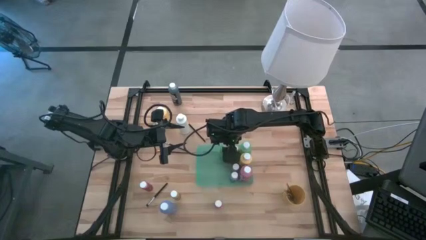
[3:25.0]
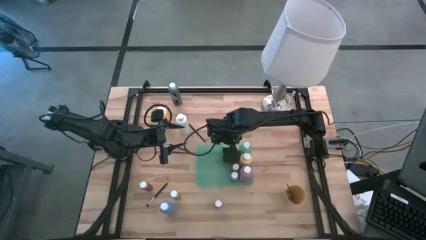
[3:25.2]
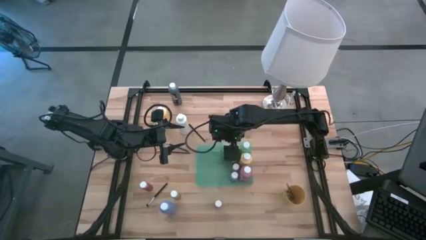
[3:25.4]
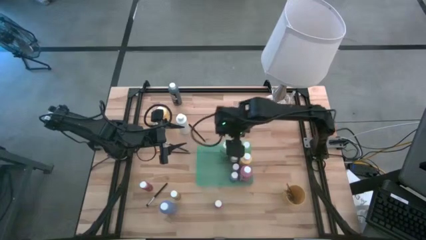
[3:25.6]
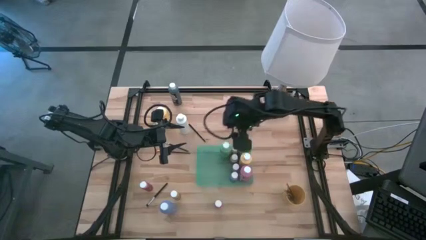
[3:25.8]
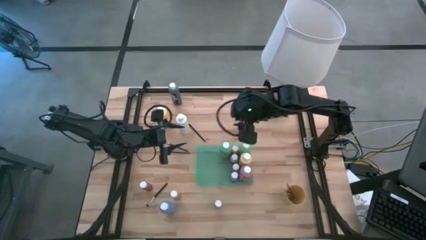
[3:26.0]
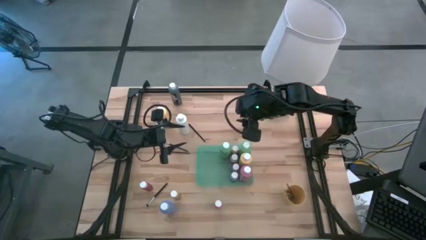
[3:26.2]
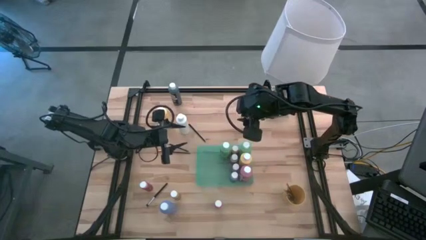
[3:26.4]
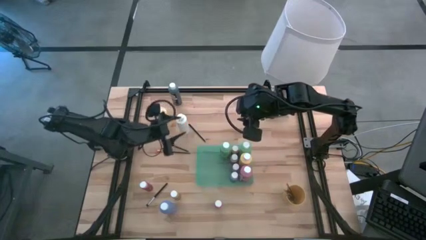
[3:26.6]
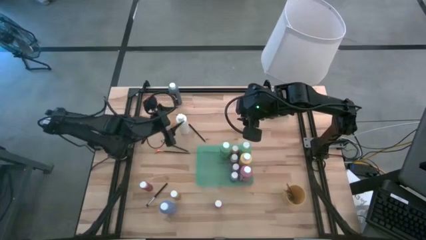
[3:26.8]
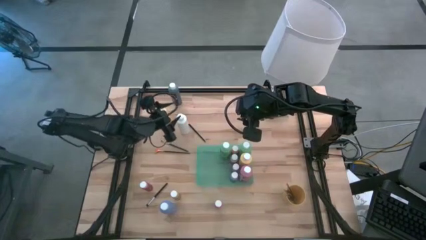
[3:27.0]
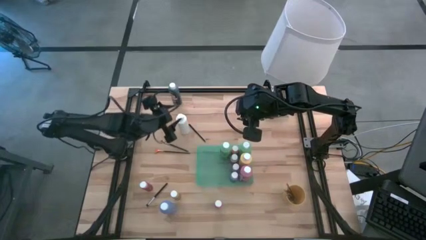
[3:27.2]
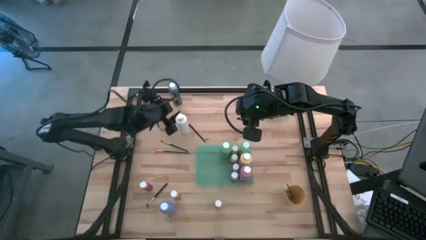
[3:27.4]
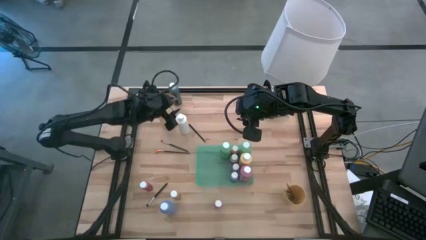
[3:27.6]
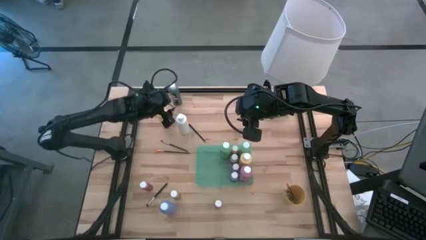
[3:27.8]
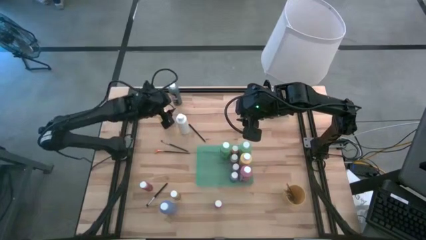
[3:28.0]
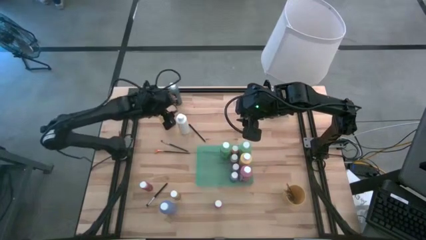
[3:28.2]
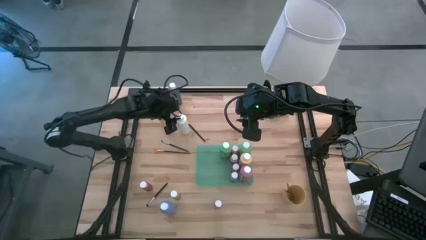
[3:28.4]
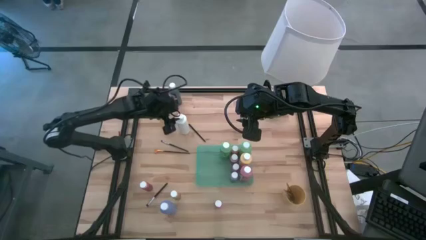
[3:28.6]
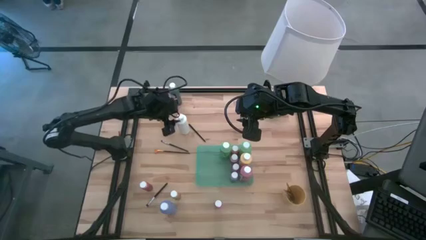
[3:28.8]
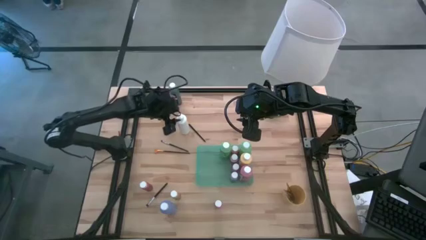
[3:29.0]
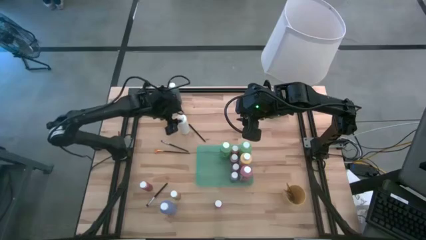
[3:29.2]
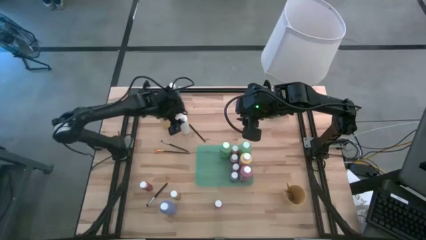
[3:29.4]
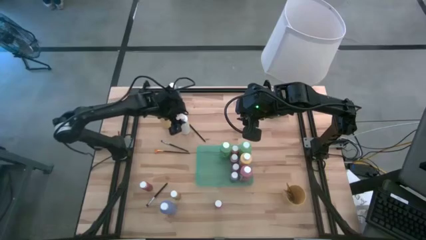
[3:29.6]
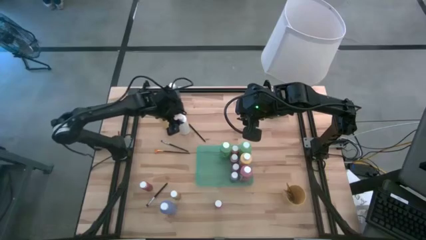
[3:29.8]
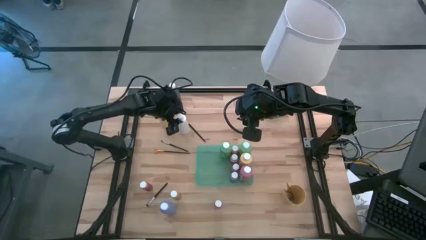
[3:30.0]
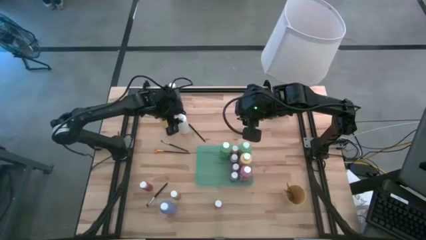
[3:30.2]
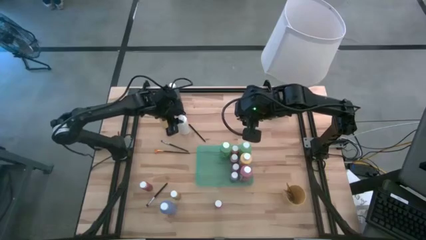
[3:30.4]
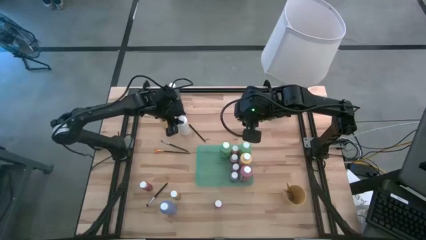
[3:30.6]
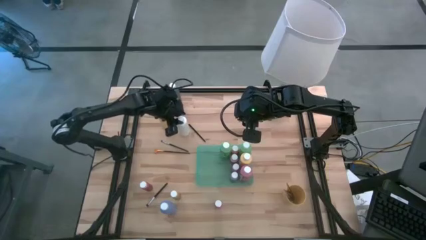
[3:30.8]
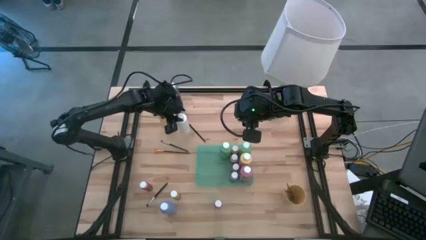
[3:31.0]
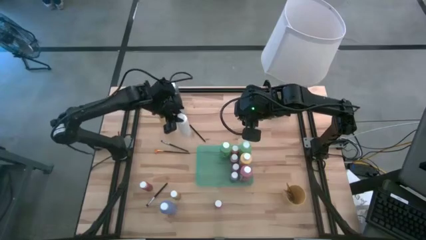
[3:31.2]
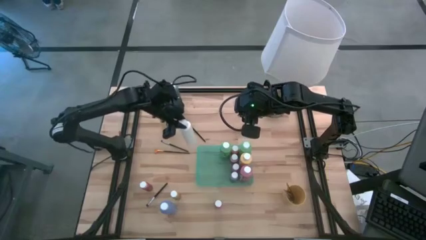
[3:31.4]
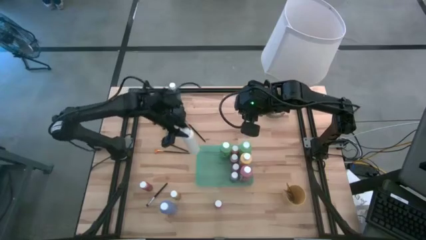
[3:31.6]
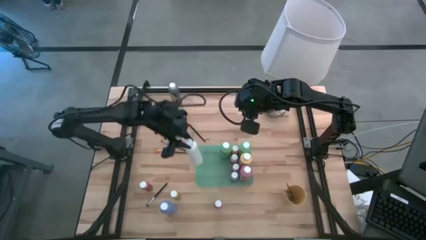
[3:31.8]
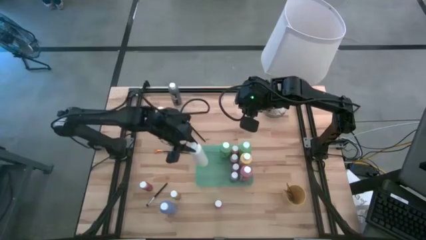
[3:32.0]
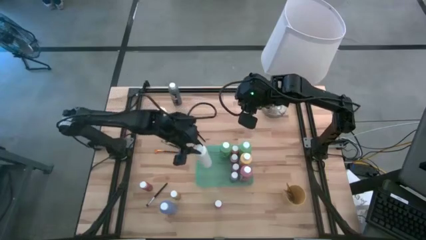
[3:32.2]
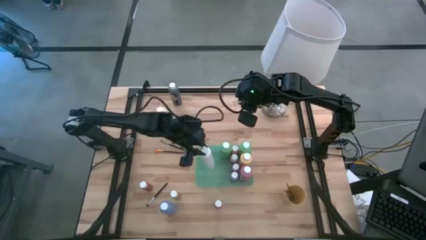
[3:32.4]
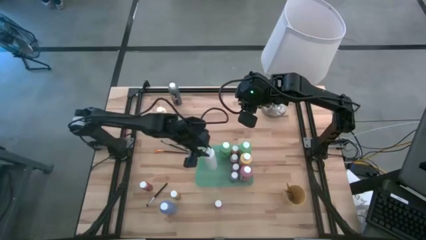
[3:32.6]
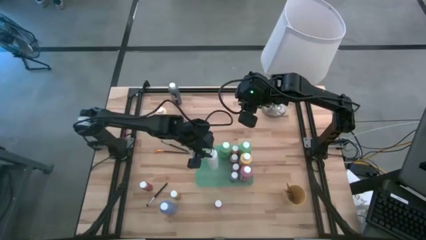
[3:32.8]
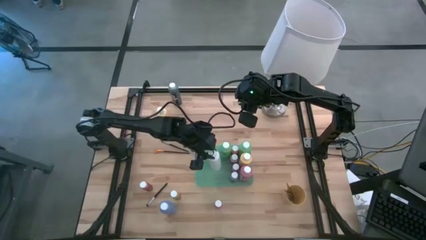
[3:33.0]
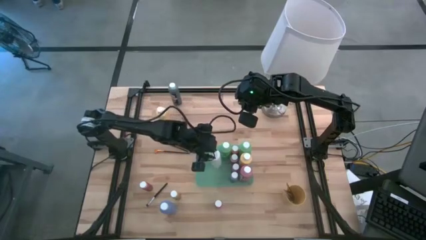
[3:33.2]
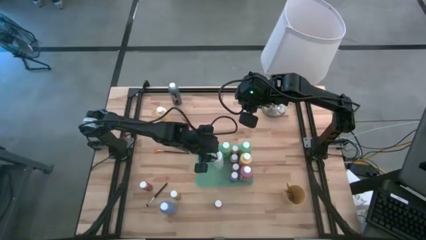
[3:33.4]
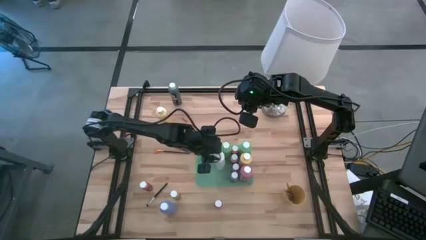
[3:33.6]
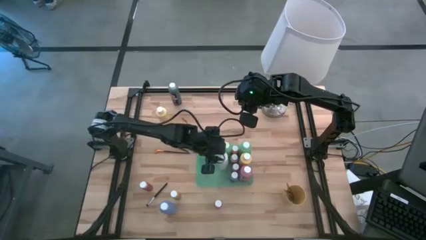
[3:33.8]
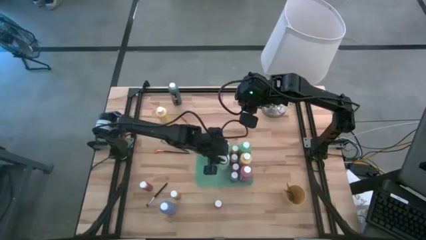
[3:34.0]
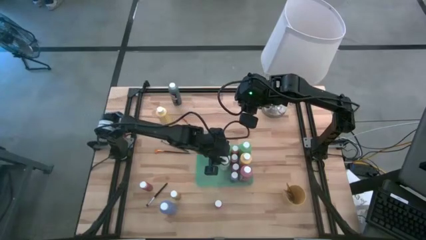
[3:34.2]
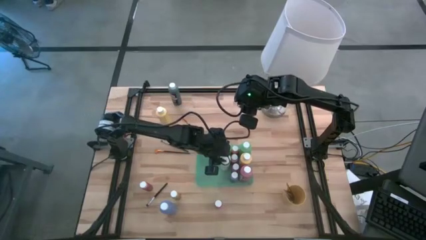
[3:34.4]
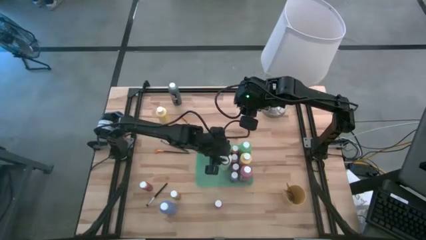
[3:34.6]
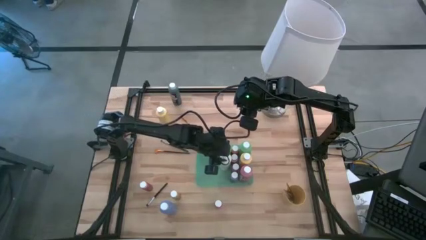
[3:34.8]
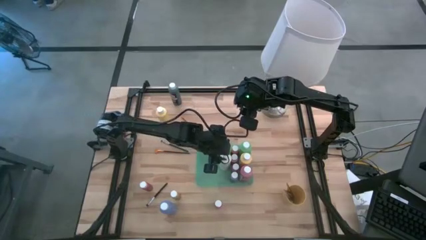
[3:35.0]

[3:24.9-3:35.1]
Task: Pick & Place Paint Supplies
Put the white paint bottle into the green bin
